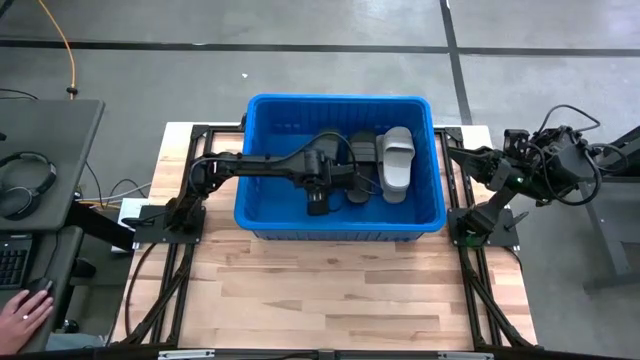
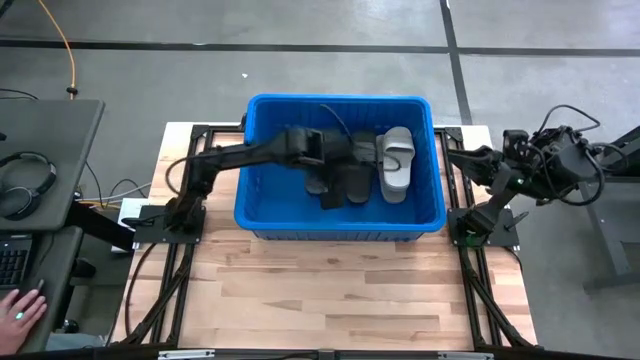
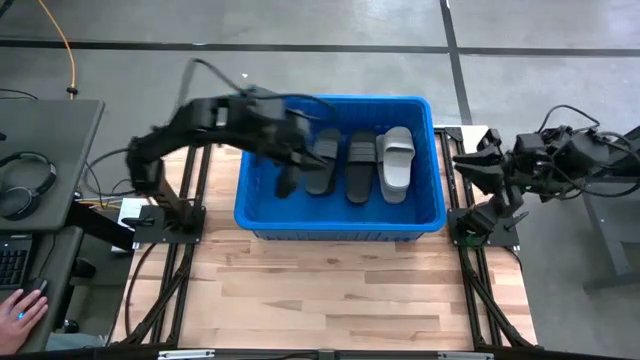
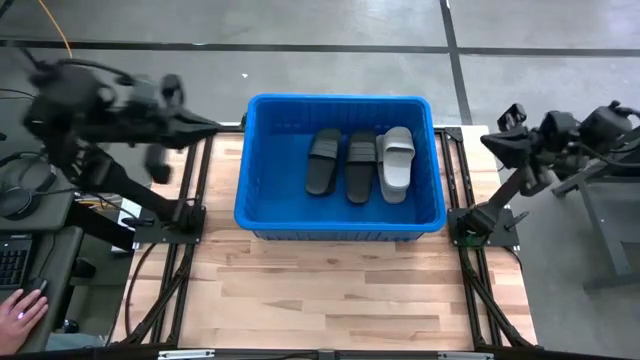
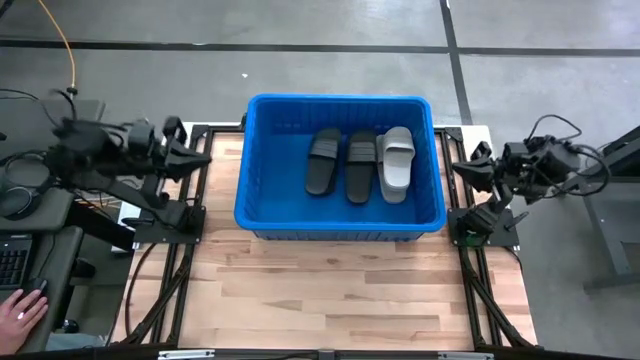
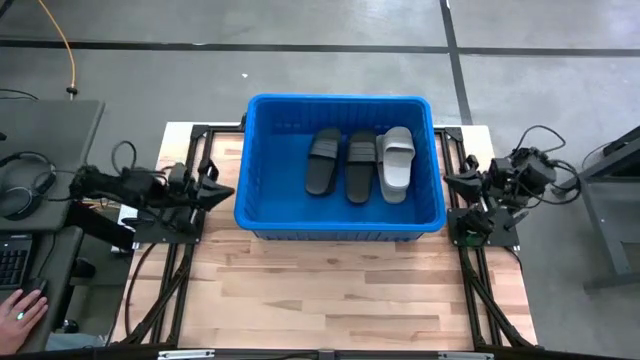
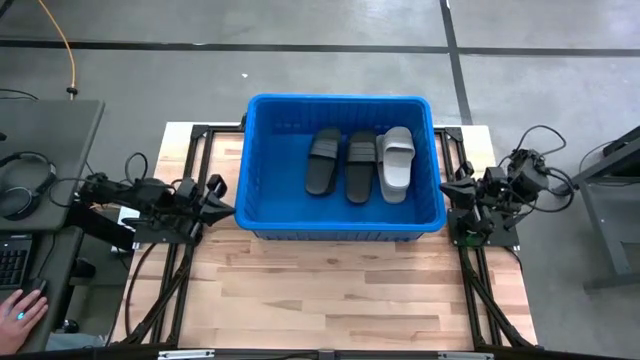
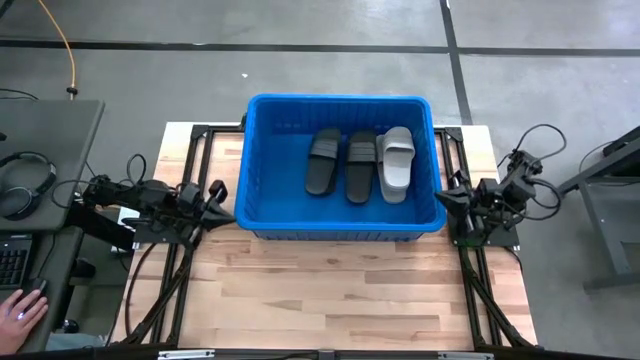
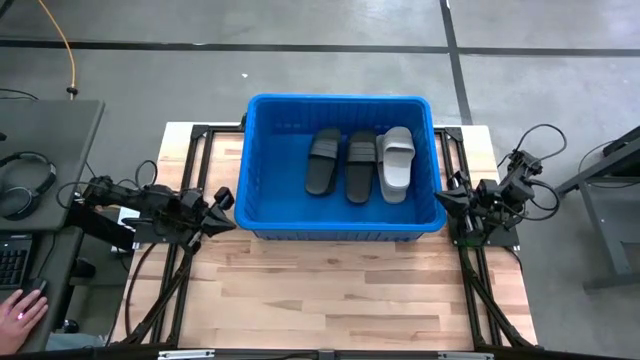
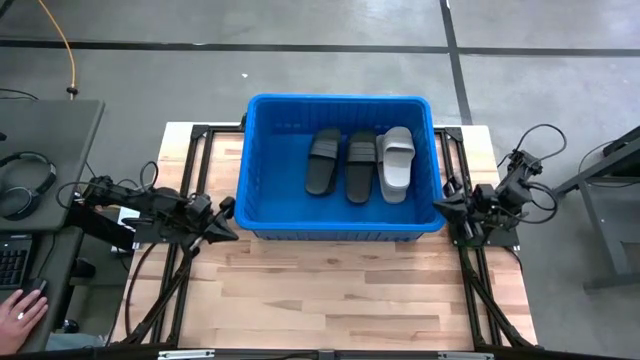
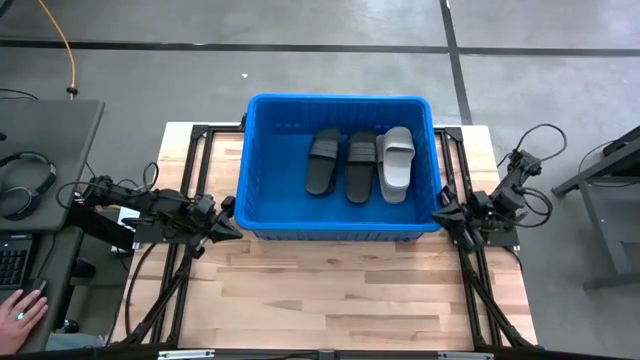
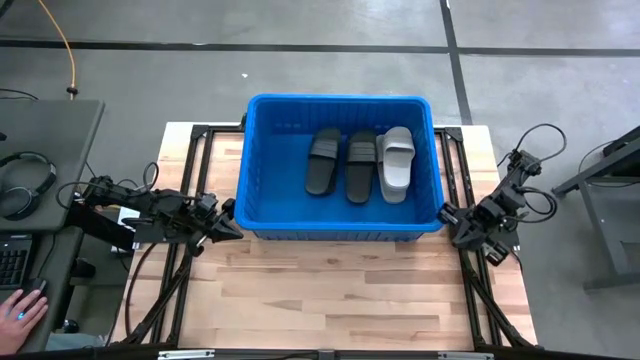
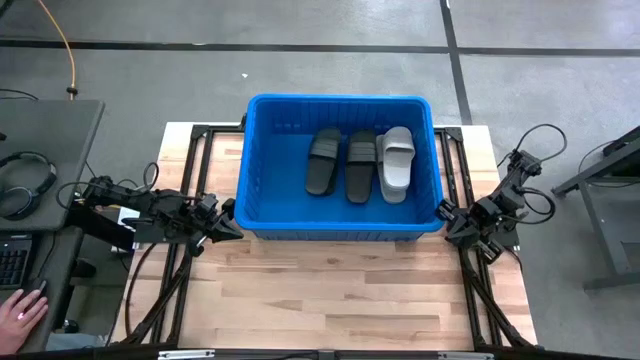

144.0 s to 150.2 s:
Task: Pick and place slides into bin
Return to Home Position

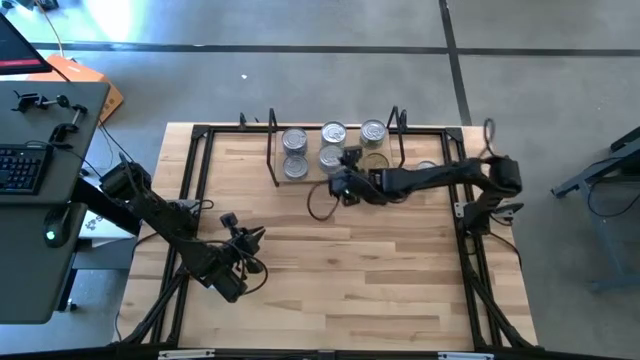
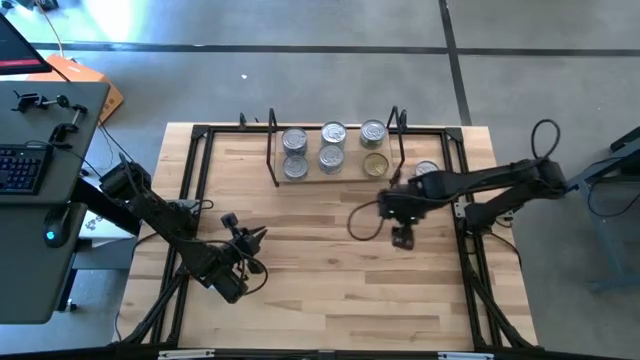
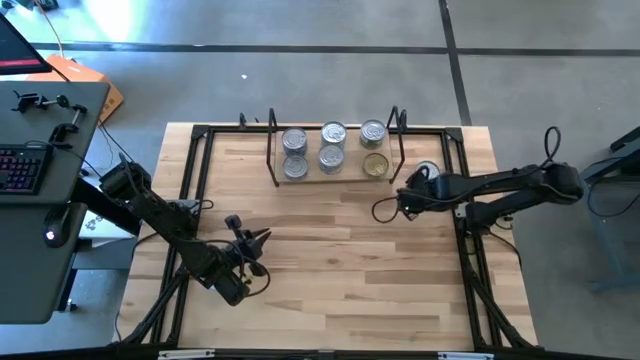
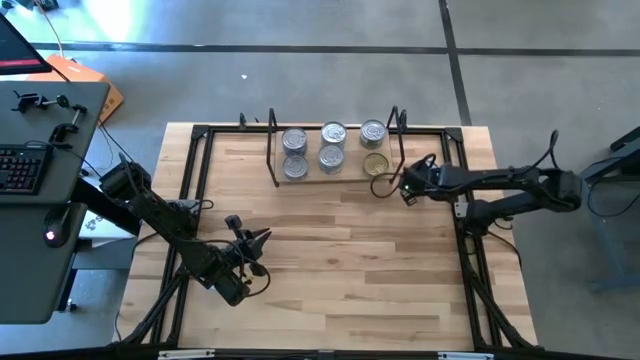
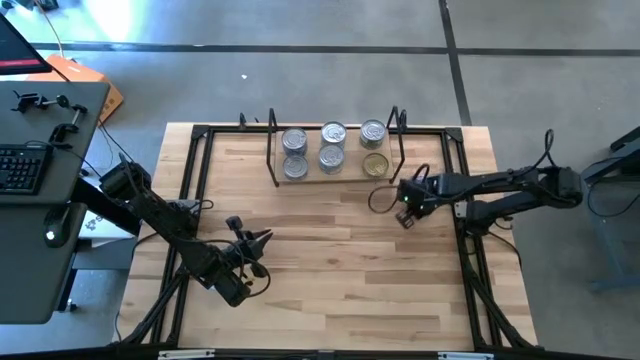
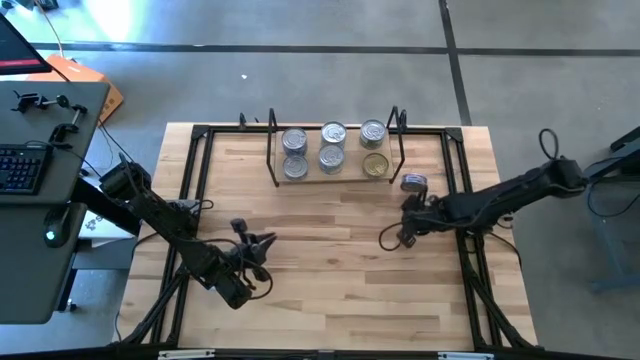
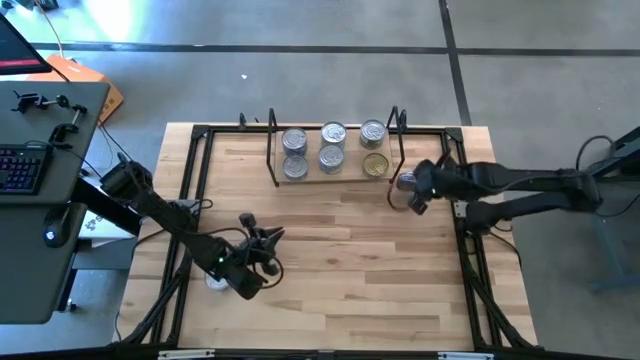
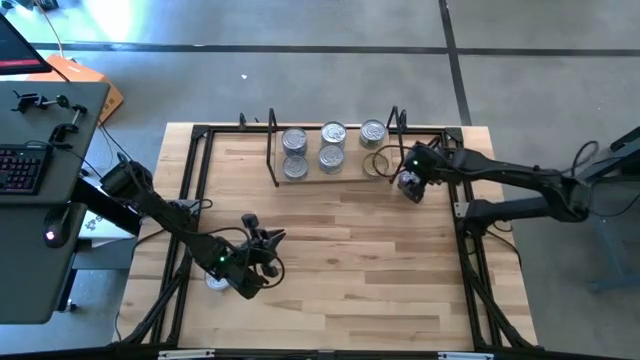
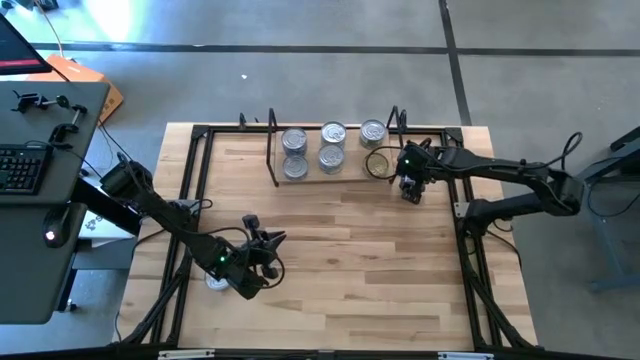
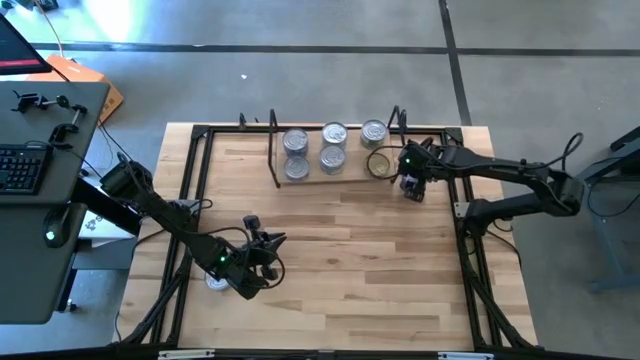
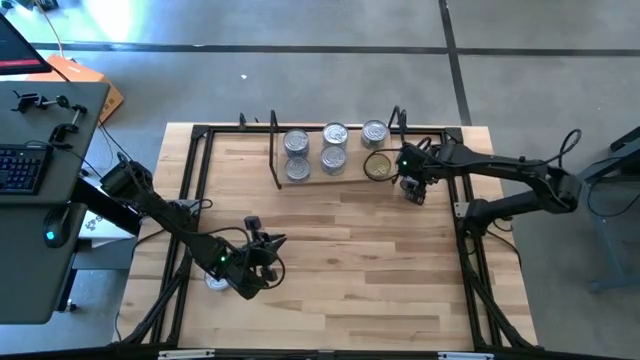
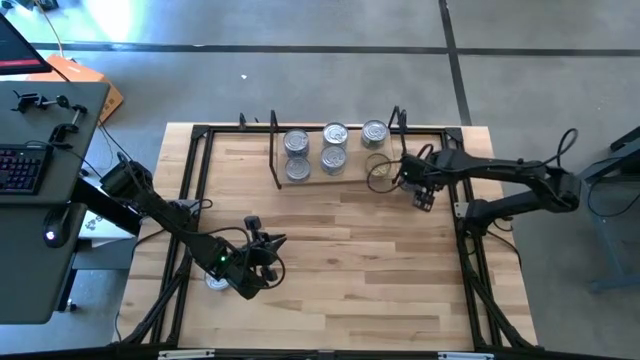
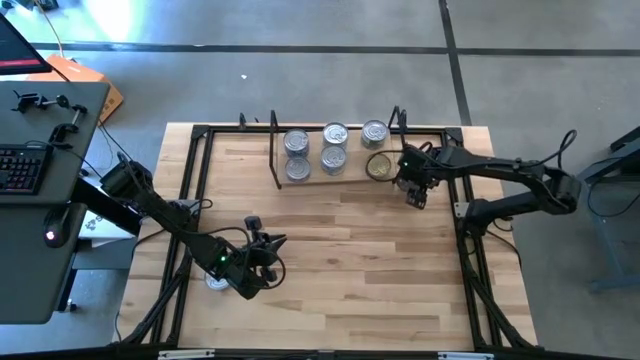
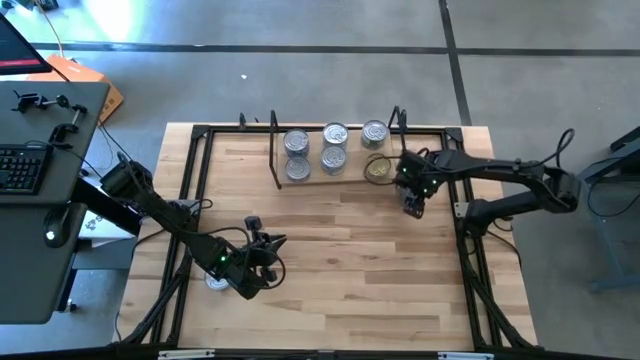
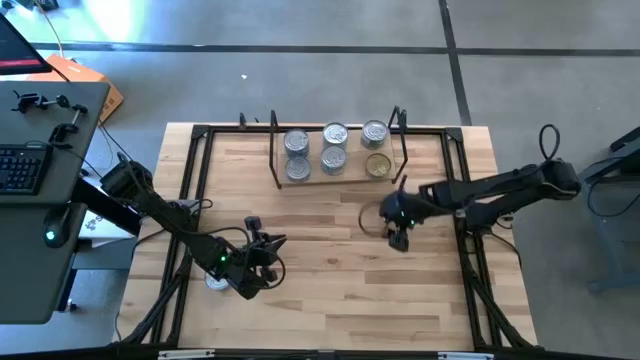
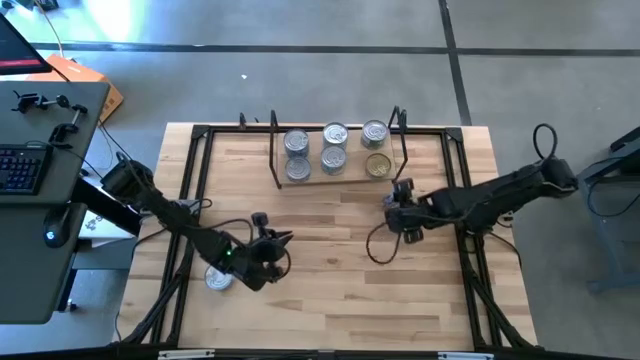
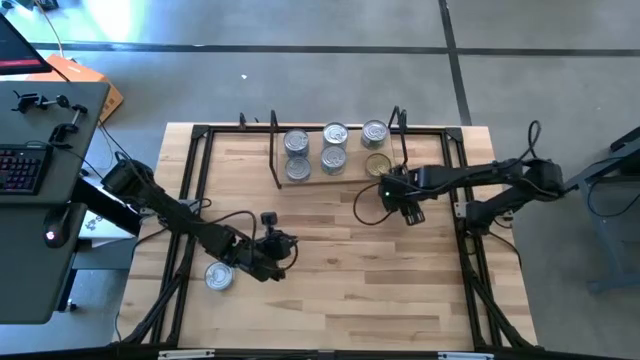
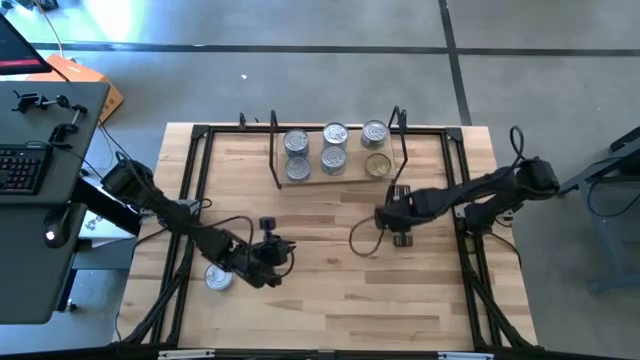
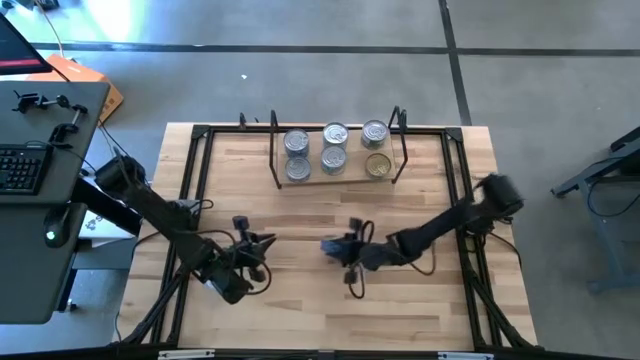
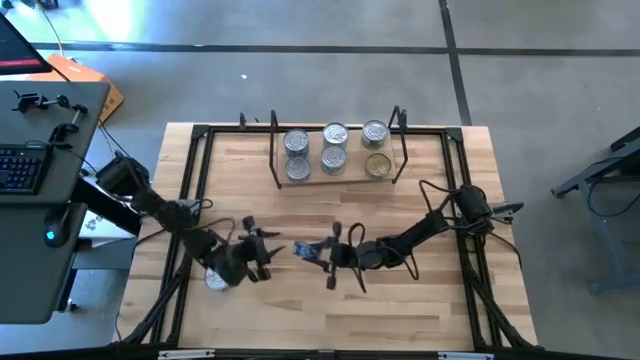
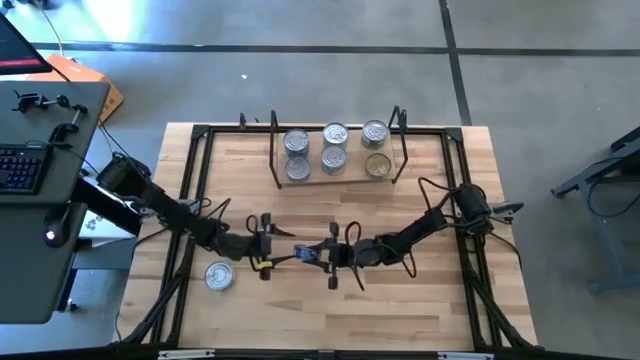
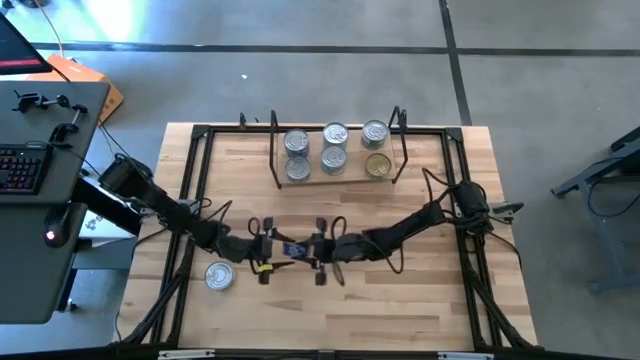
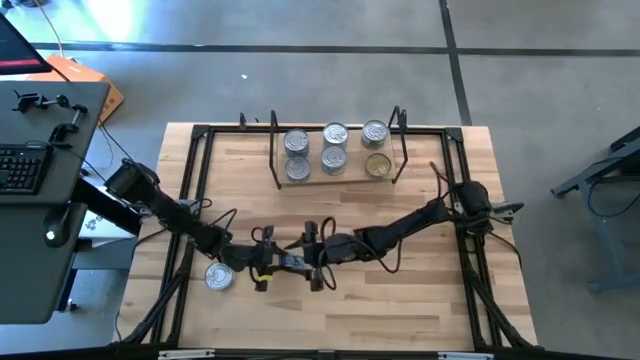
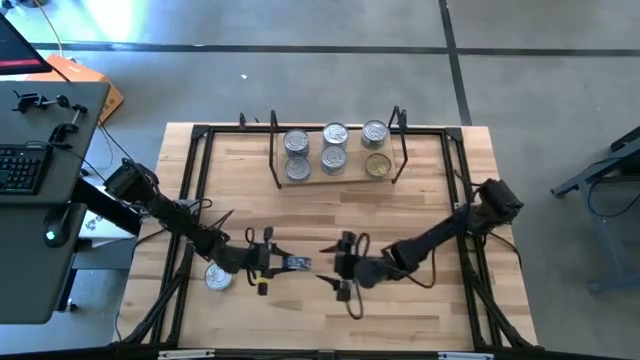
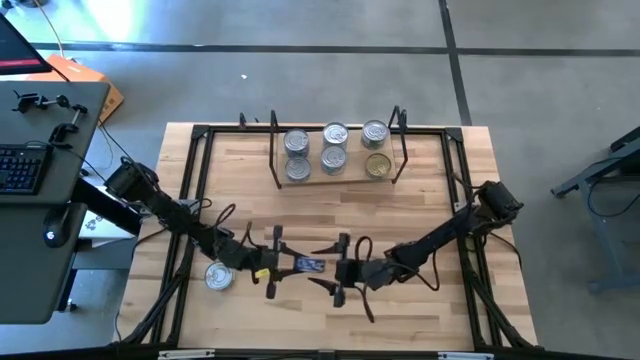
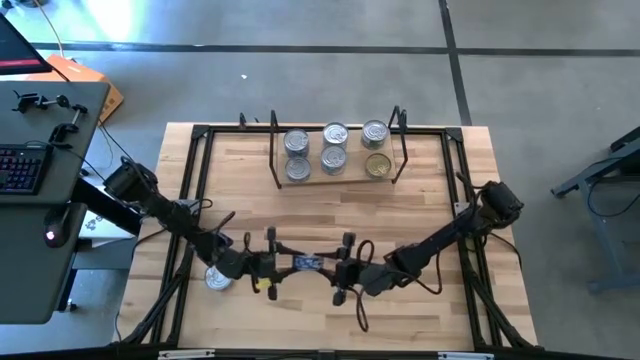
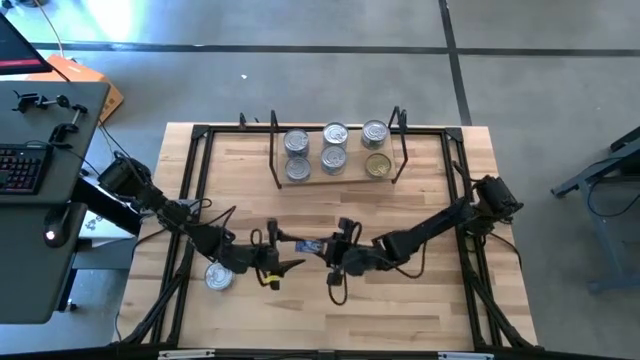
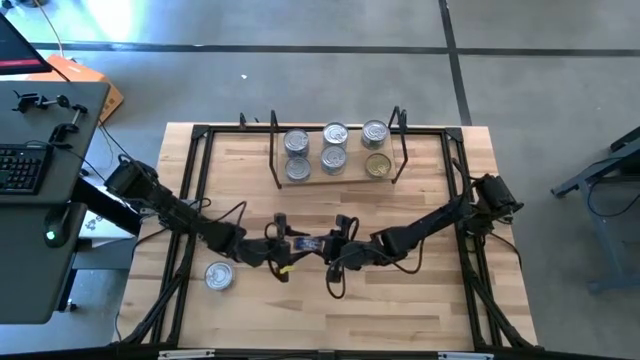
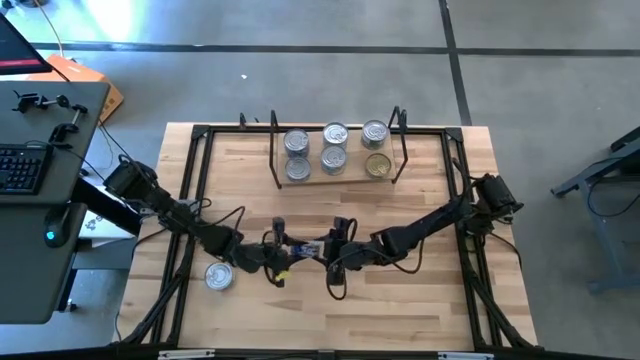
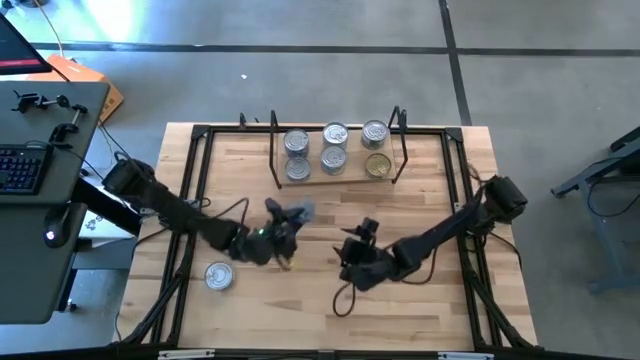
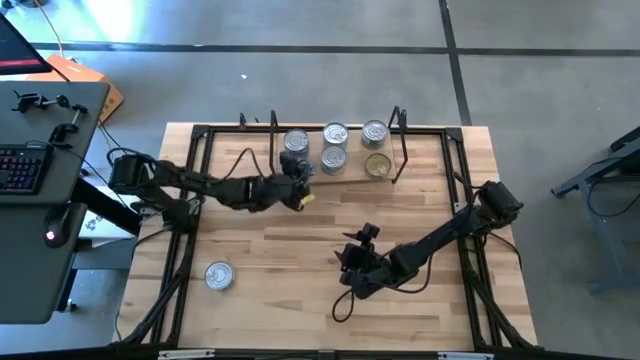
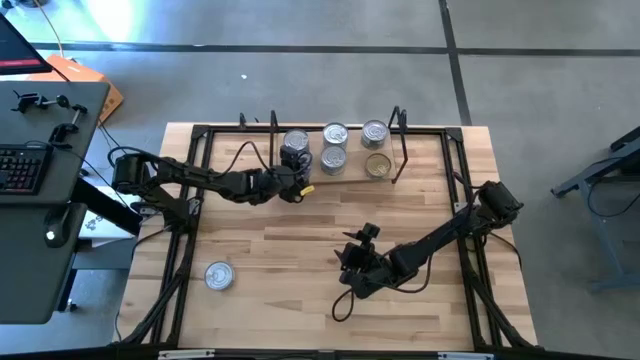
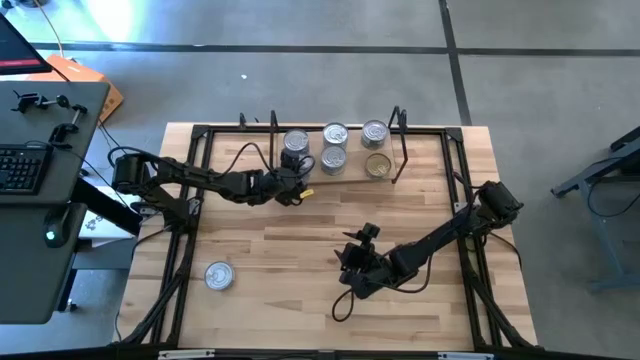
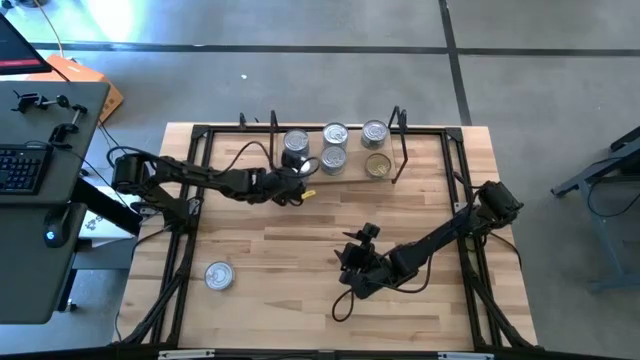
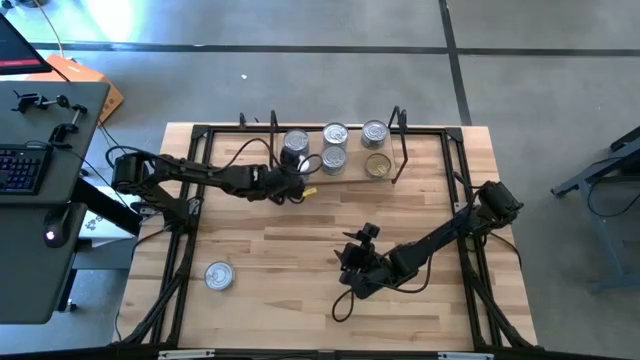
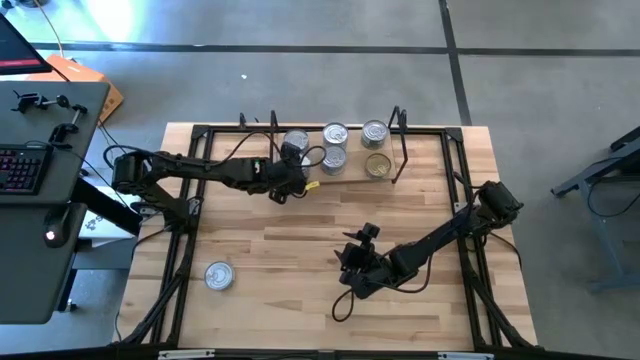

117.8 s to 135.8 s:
Task: Stack canned seafood by type on shelf
Stack the blue tuna can on top of the blue tuna can on the shelf
